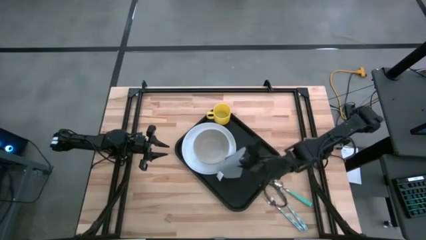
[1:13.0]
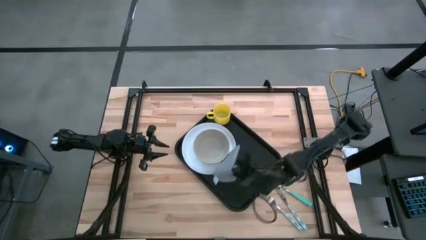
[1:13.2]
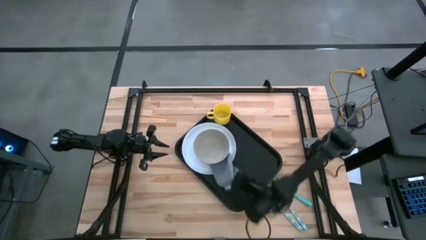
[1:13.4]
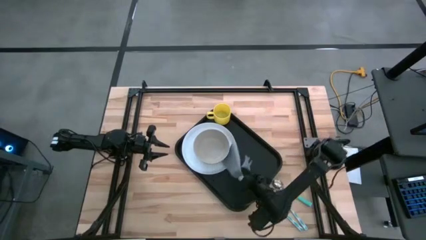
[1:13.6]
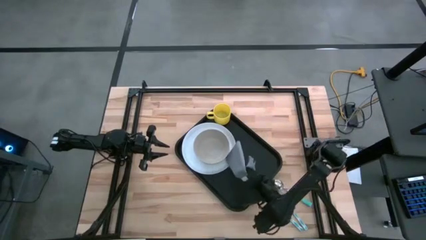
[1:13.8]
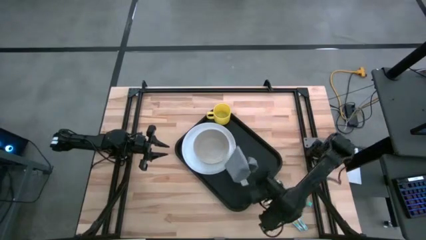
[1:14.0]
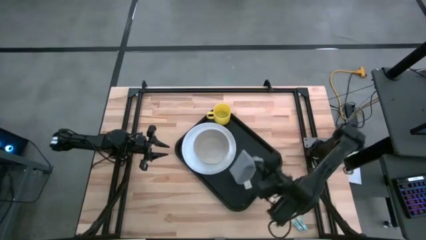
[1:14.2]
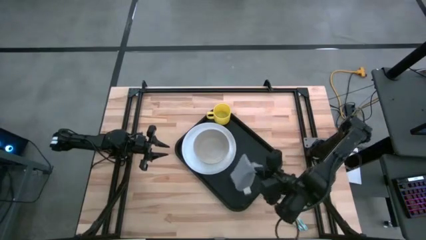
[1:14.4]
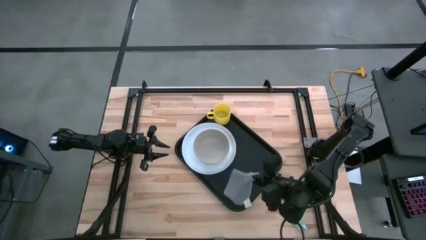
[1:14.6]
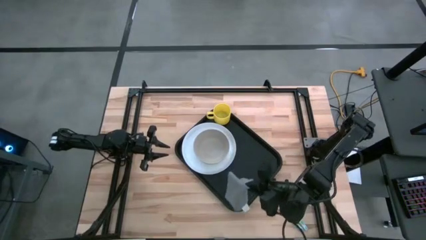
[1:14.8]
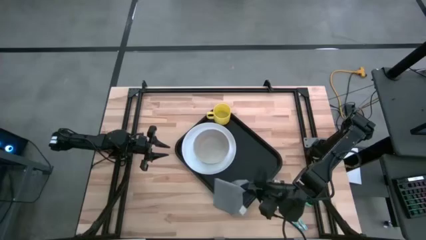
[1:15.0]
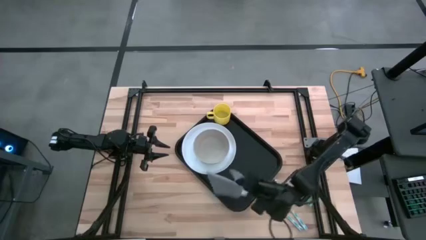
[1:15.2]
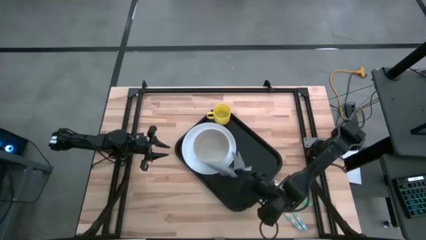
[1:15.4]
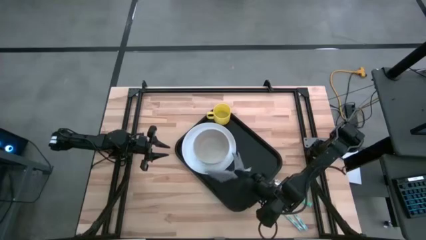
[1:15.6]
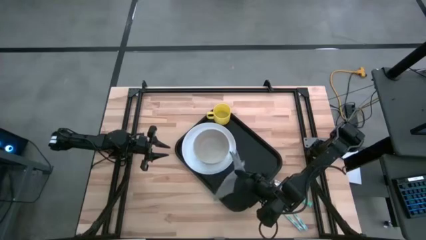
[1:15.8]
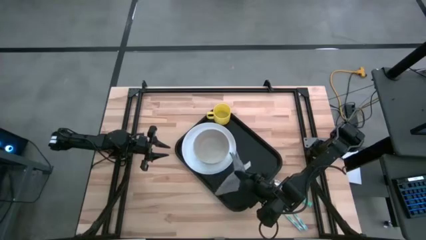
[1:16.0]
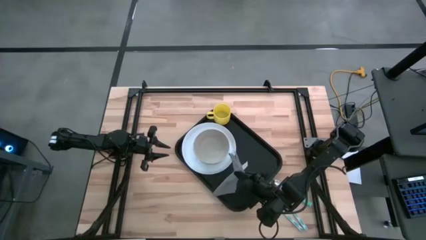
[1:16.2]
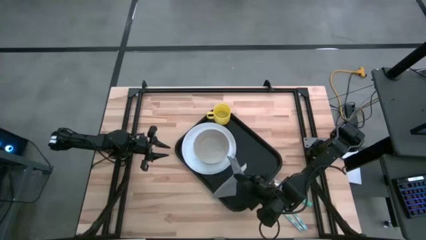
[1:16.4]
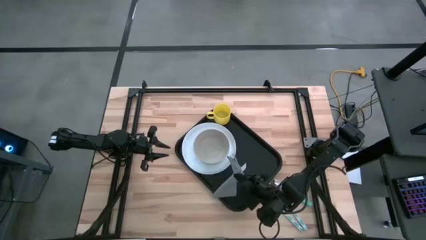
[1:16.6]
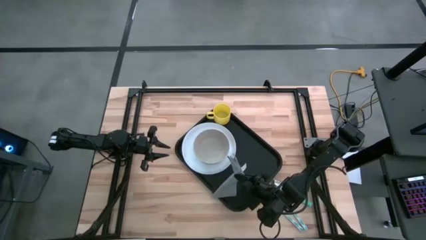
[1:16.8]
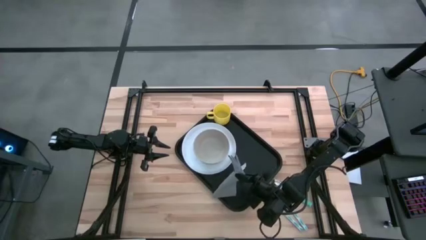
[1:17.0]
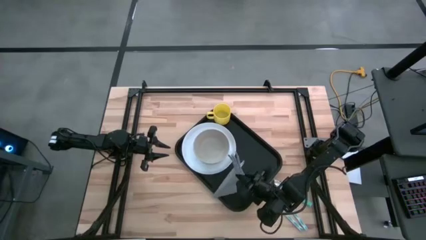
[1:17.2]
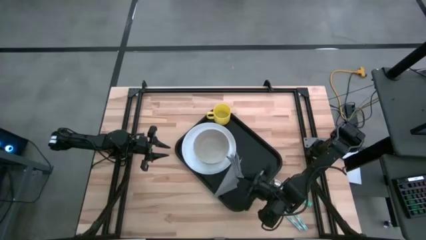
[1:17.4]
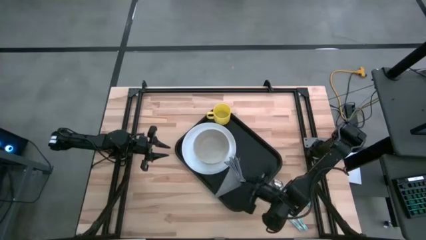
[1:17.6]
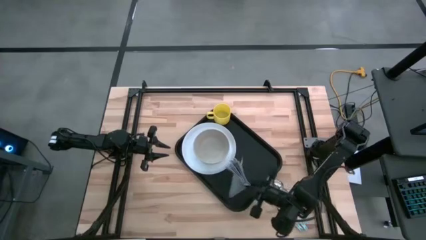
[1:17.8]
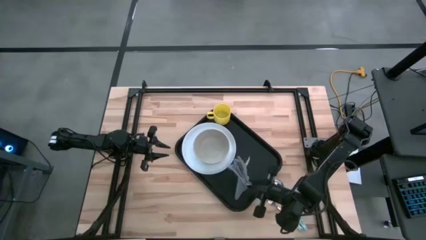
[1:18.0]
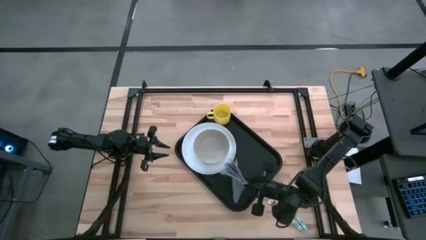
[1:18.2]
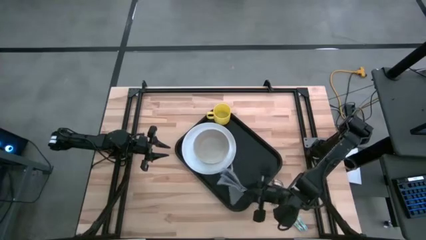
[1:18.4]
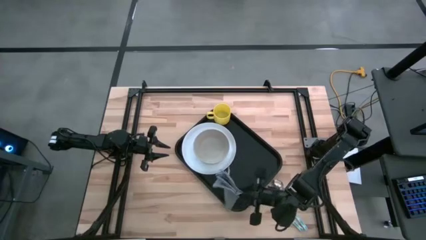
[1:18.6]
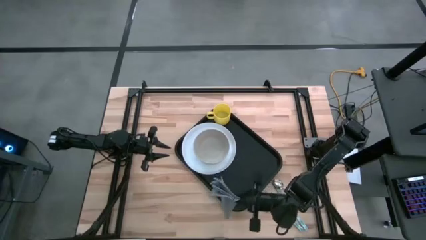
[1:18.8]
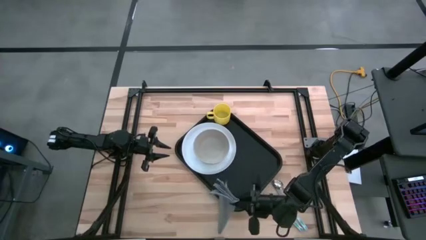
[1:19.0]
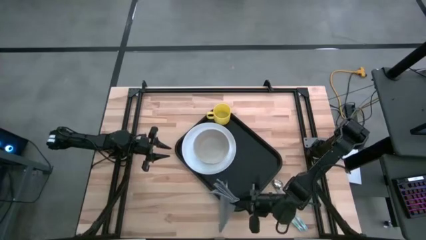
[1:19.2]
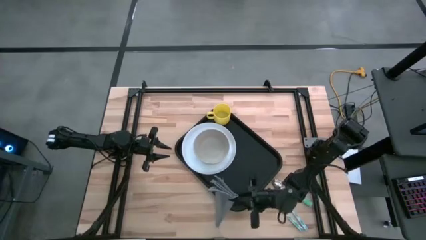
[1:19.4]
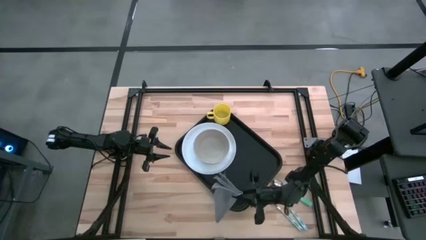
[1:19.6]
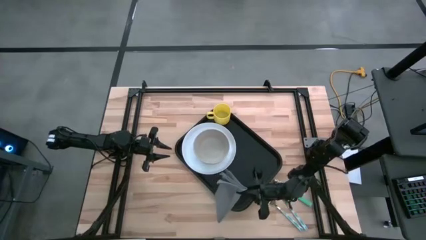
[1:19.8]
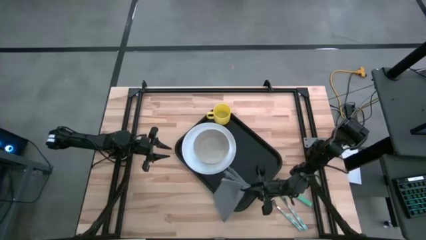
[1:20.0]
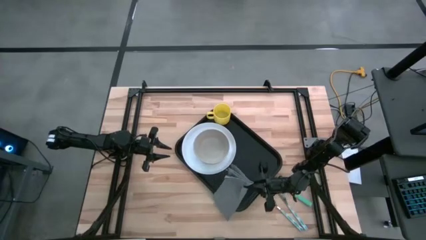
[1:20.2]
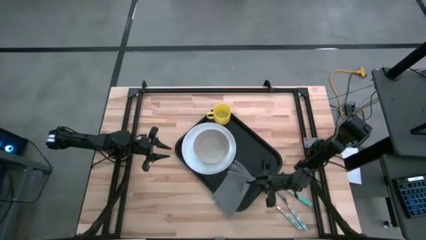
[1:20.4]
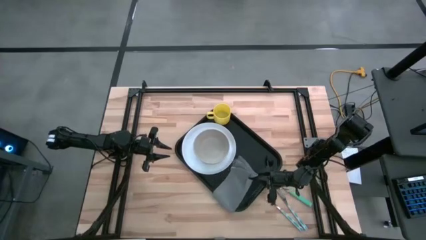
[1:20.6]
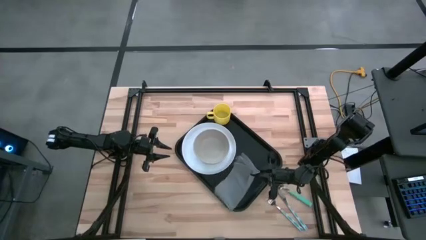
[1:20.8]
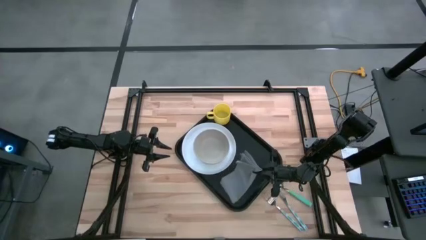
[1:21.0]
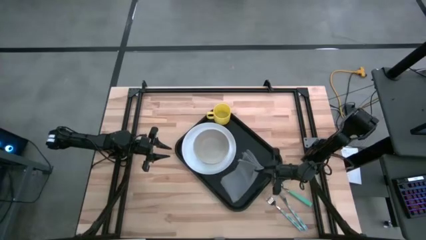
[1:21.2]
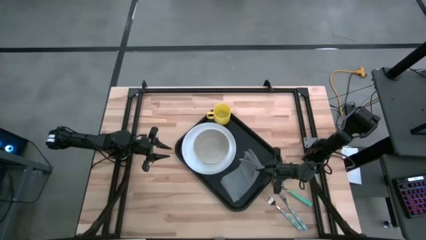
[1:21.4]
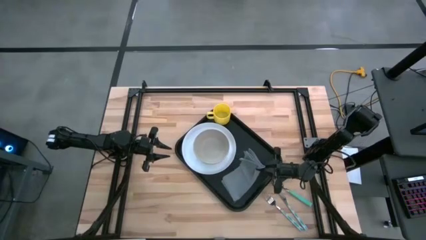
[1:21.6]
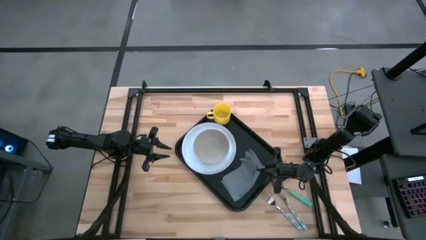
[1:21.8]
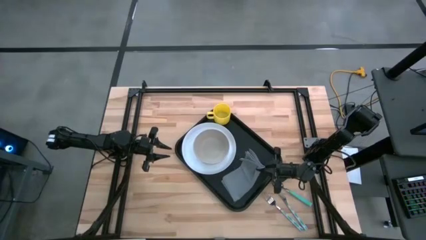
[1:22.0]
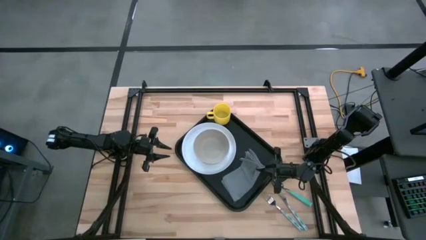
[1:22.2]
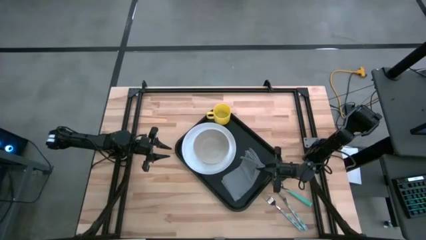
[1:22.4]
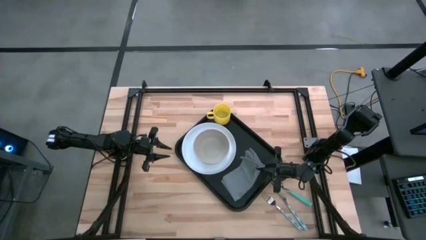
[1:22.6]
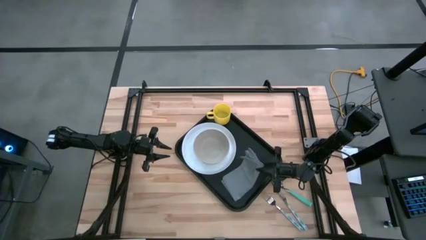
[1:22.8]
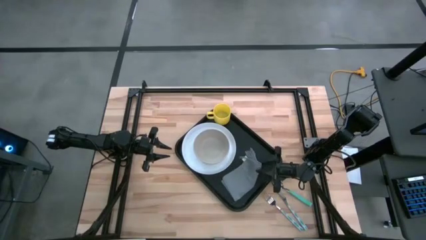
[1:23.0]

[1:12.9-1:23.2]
Task: Set up tray
Put the gray napkin to the right of the white plate on the black serving tray

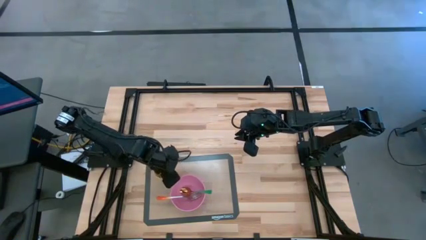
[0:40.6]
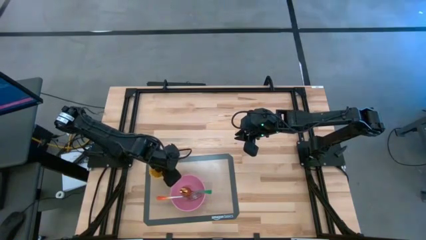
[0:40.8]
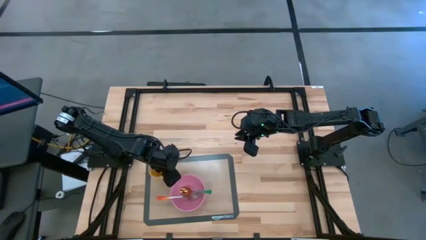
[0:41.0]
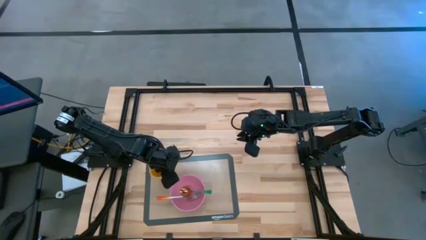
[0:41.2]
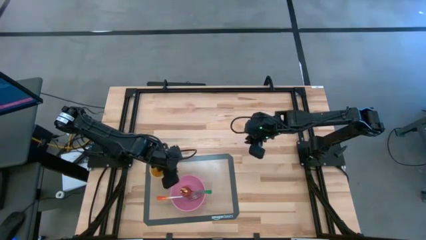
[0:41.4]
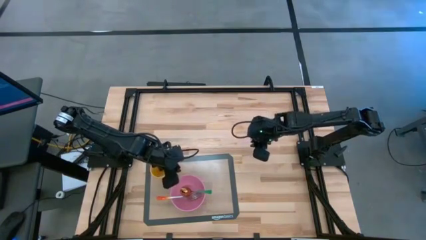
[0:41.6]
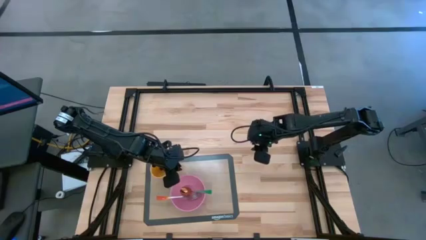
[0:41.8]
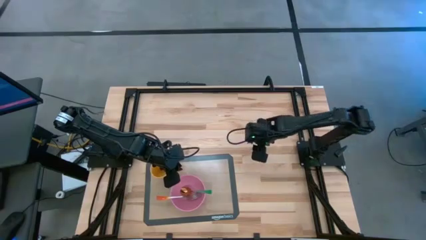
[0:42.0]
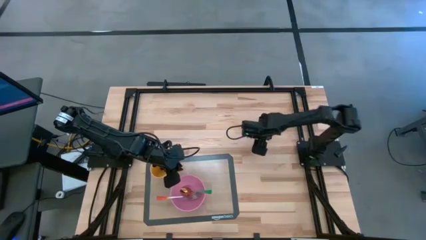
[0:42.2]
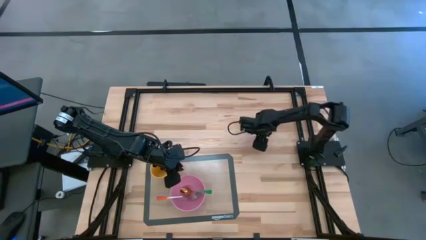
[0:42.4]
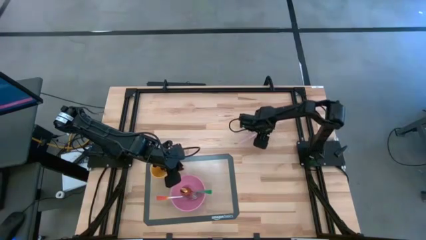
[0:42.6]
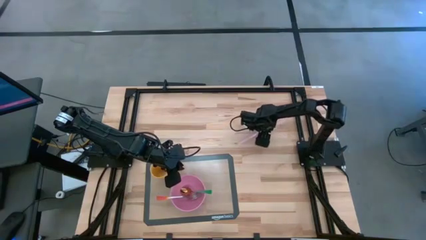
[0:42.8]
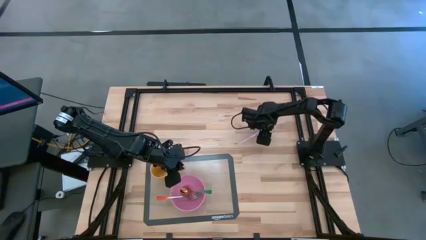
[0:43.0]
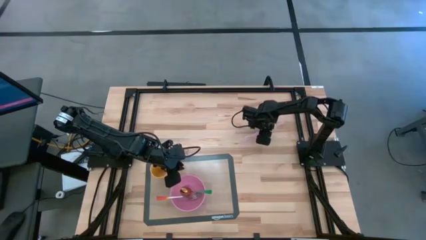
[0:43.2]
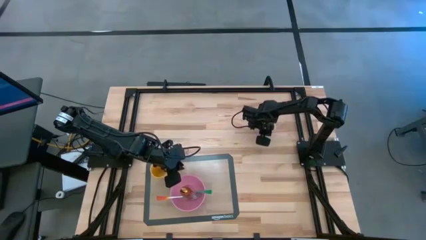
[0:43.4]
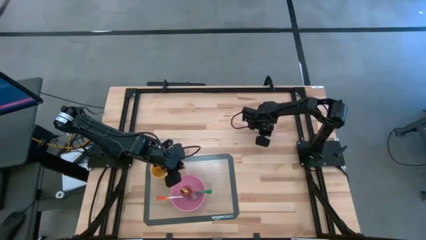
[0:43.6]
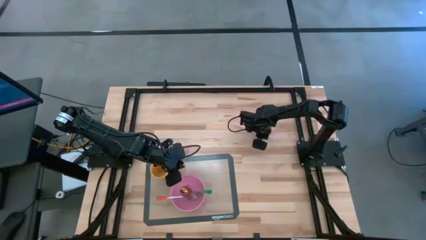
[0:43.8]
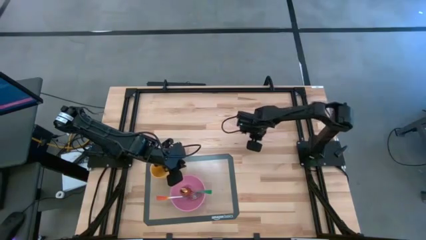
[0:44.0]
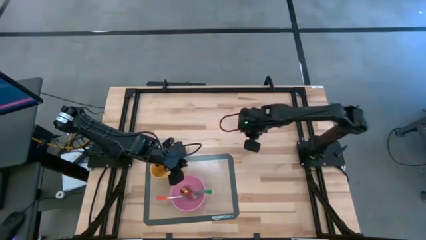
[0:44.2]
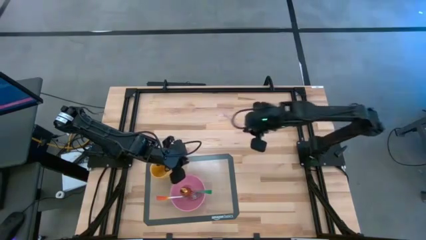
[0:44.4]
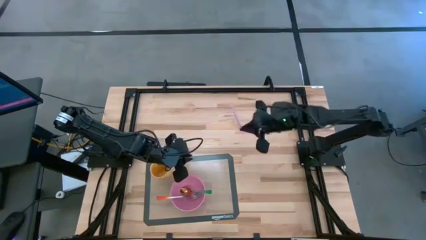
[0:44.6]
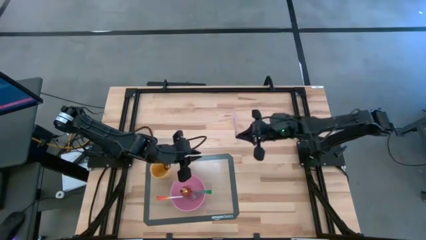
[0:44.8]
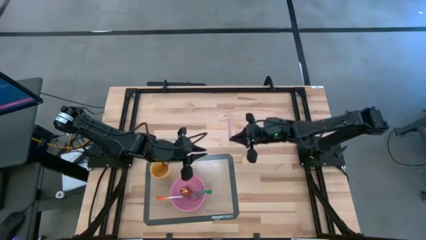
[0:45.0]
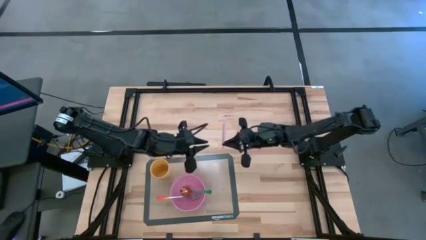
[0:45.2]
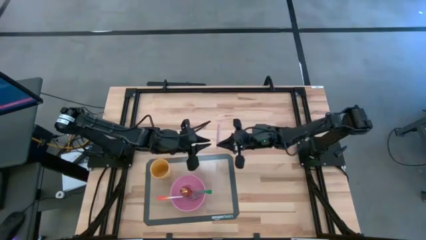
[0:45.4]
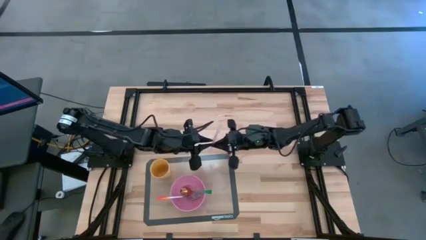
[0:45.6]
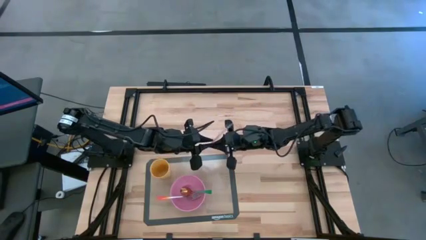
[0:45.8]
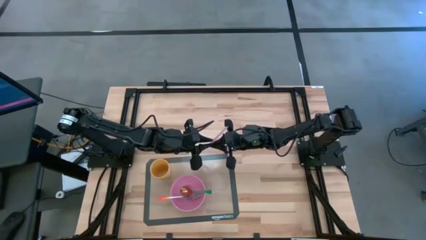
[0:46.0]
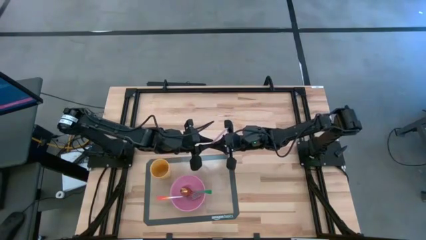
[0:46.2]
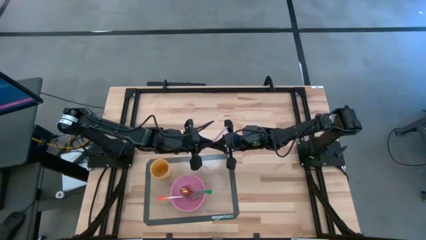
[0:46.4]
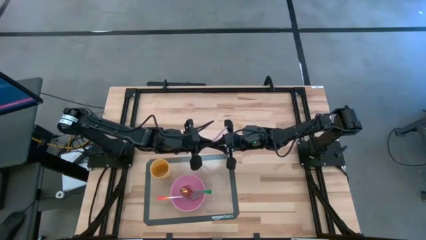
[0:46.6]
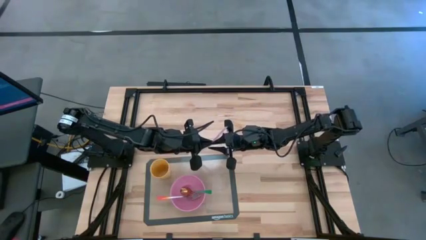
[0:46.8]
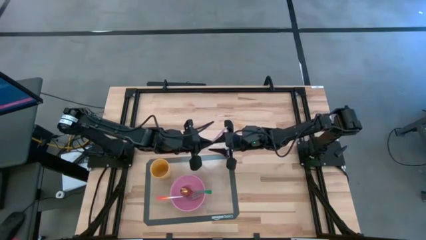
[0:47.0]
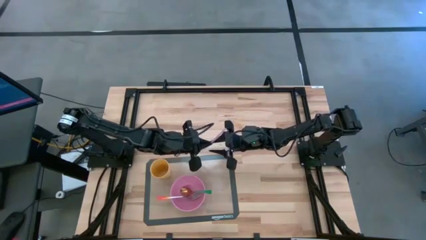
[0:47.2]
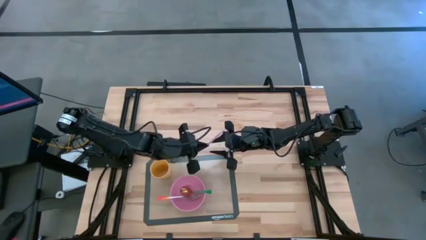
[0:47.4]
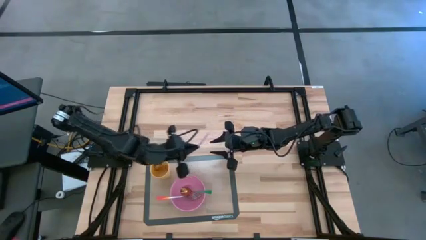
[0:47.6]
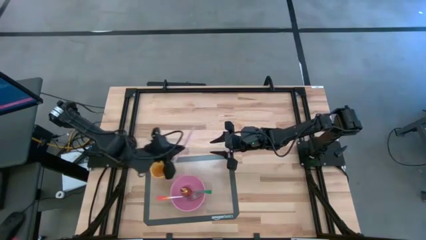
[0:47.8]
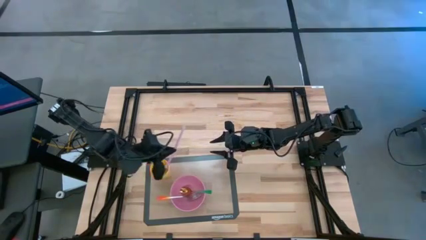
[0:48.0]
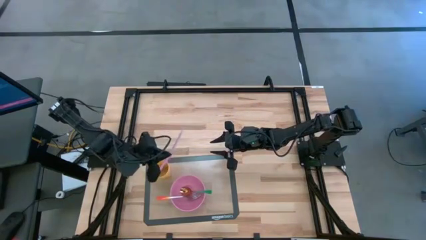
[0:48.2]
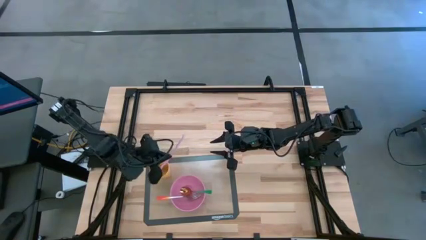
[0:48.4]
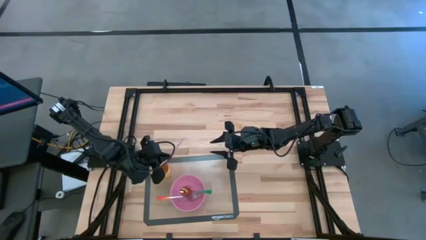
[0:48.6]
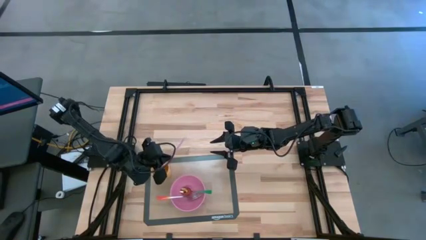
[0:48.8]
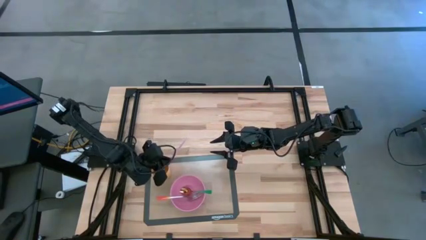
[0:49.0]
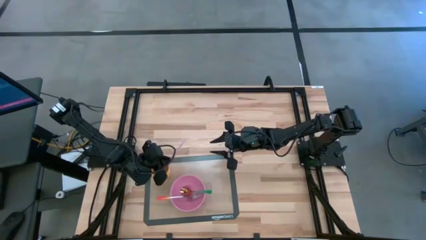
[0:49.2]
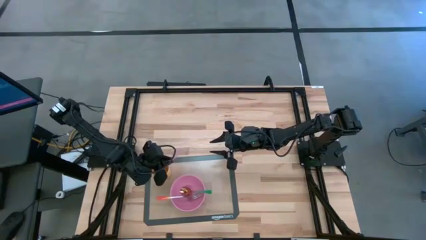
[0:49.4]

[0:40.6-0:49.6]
Task: Pick & Place Utensil
Put the pink straw into the yellow cup on the transparent mat
